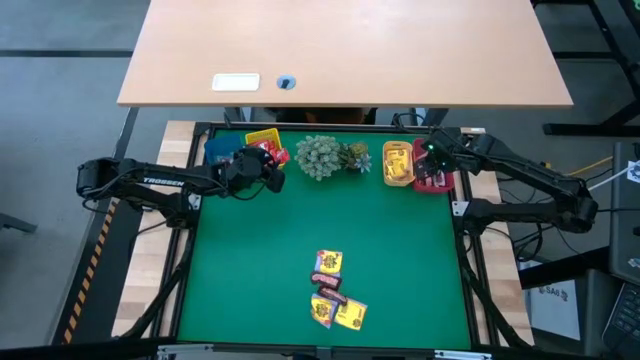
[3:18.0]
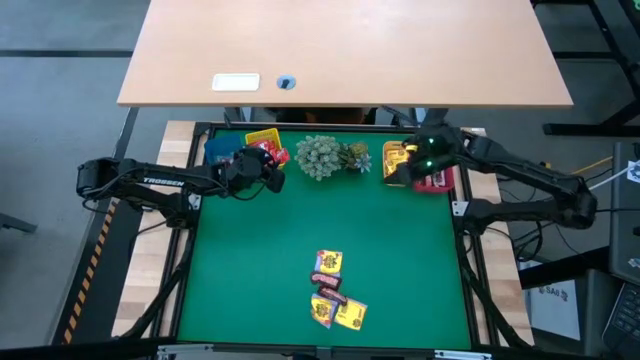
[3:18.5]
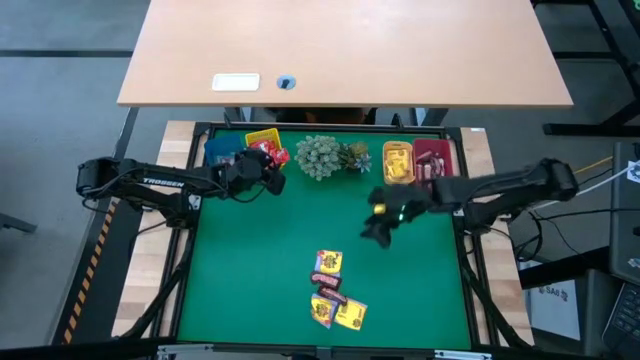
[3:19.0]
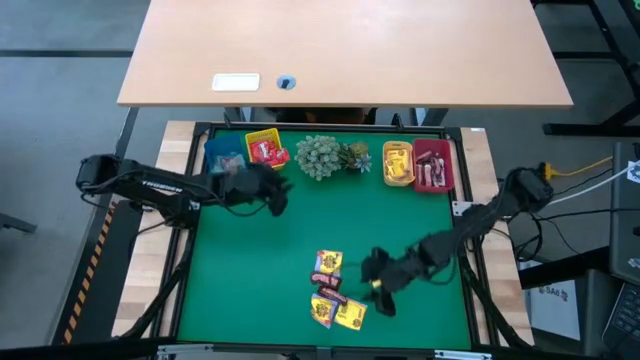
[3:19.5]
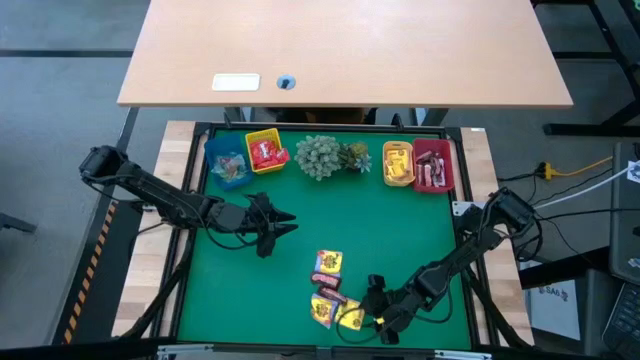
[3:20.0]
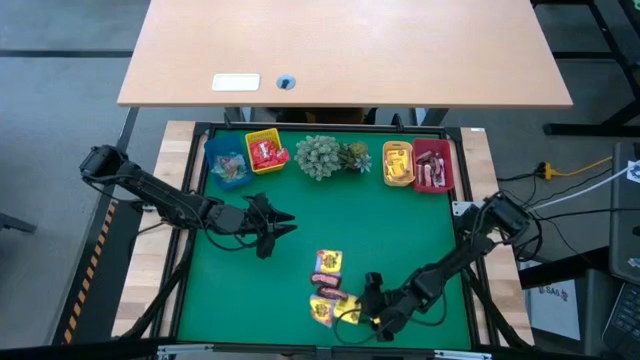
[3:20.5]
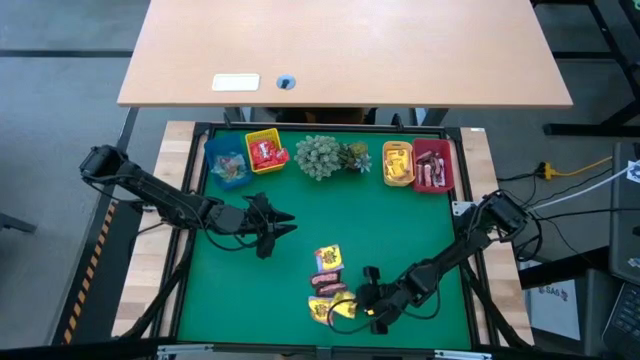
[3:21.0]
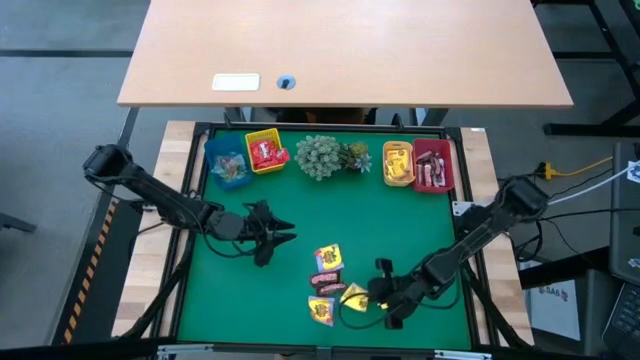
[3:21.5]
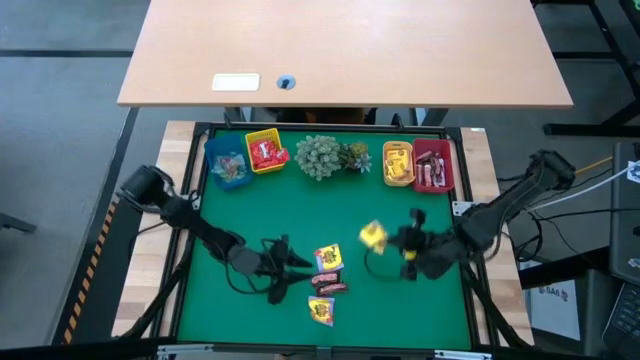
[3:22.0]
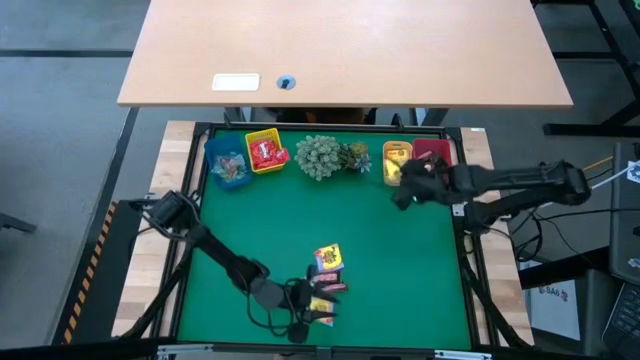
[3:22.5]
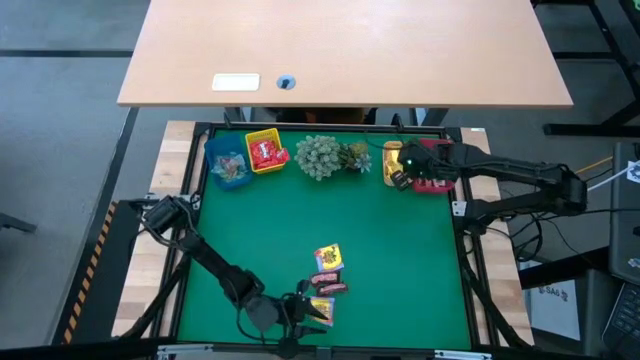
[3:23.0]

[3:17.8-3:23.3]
Task: Sort candy
Put the yellow candy into the orange bin

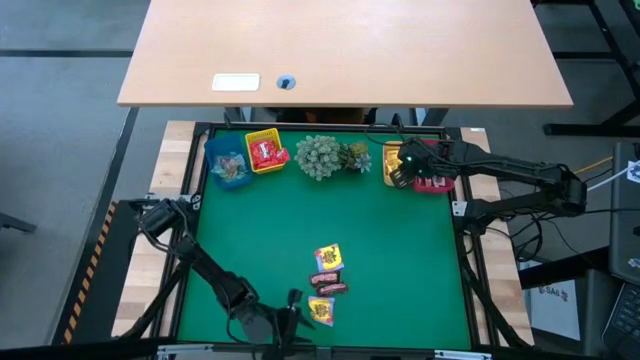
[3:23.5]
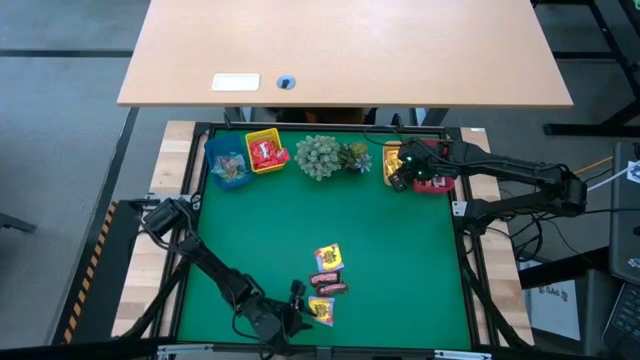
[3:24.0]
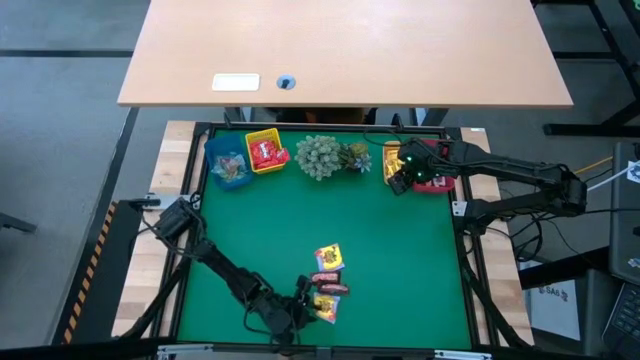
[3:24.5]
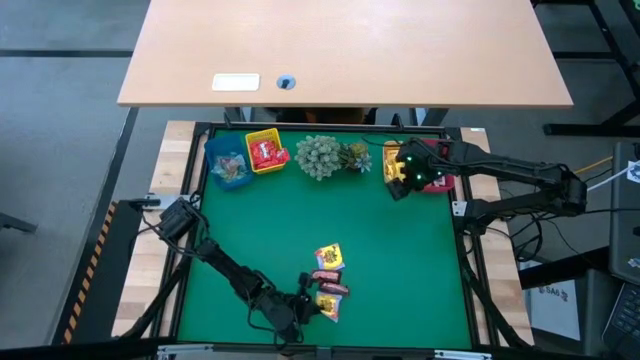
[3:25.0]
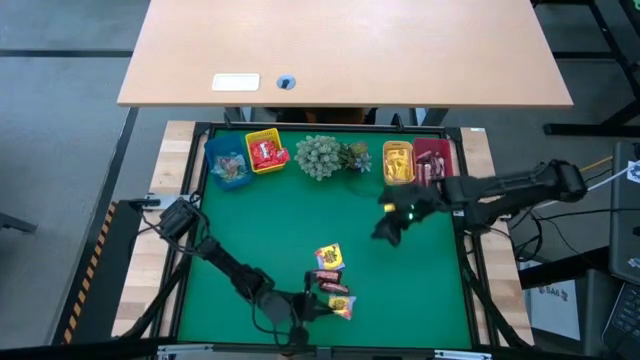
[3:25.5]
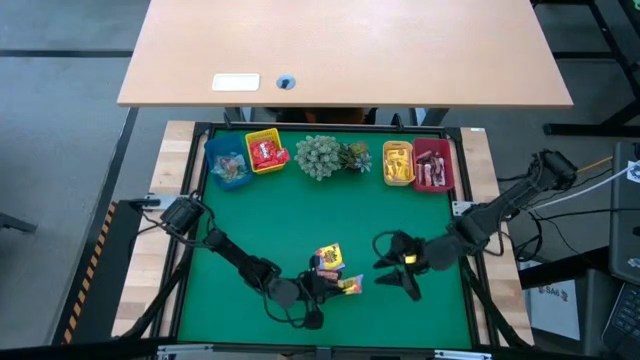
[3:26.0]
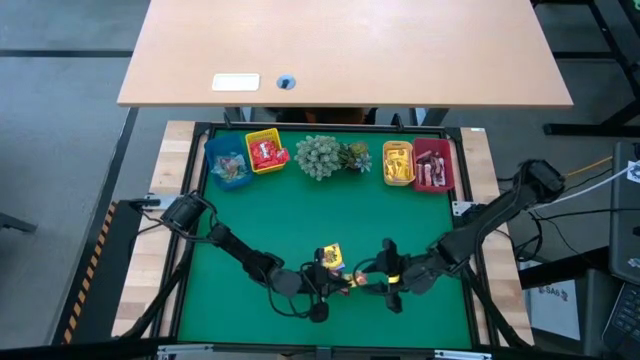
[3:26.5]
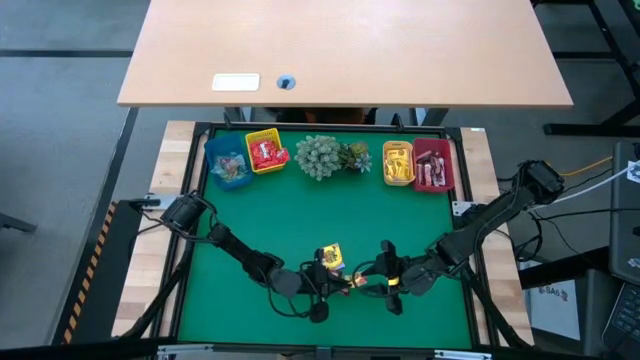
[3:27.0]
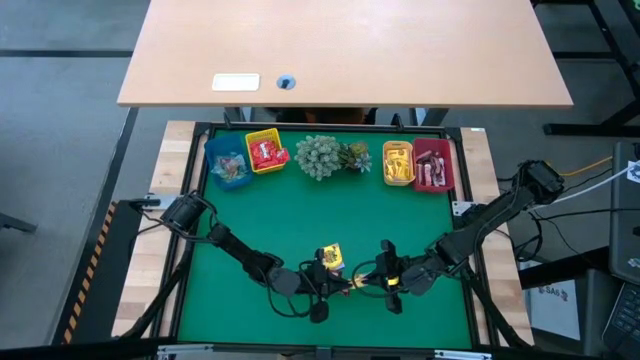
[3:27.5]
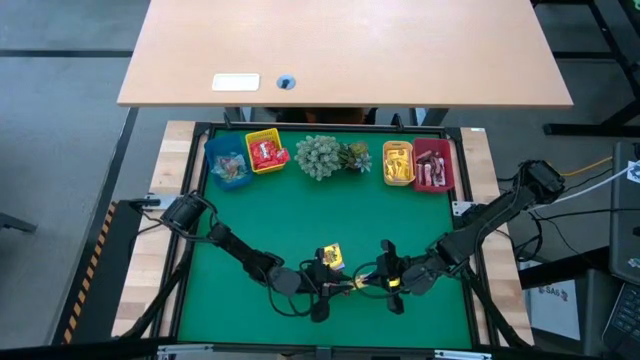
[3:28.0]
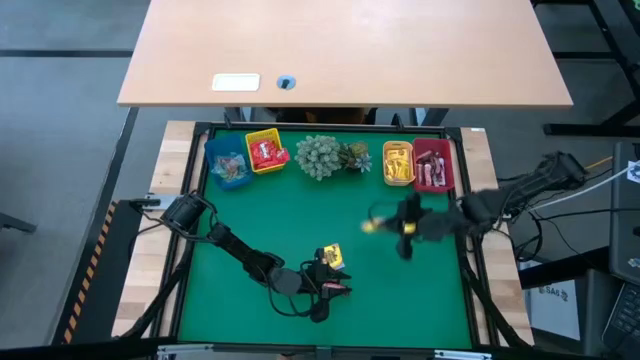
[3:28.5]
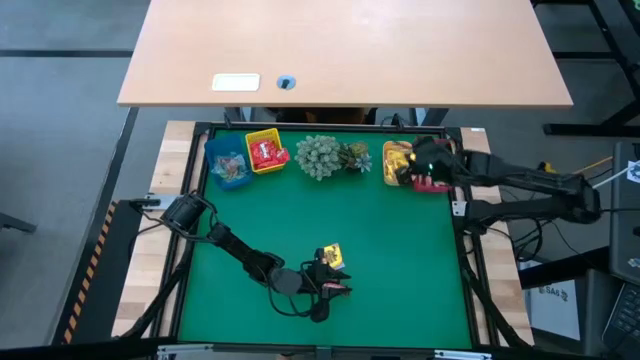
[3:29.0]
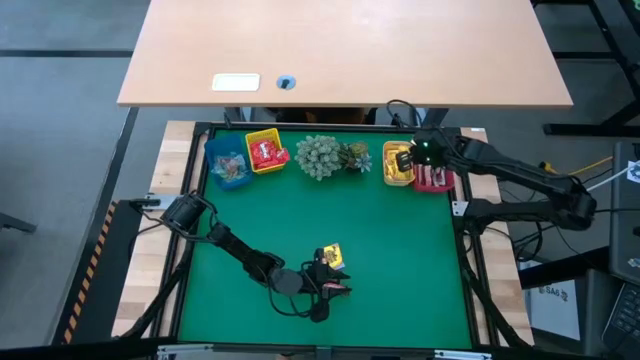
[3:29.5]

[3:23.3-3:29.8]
Put the yellow candy into the orange bin

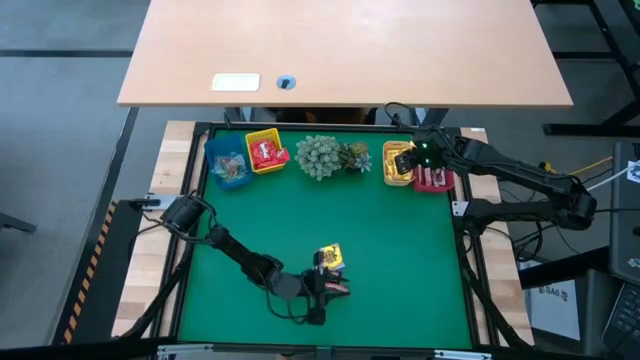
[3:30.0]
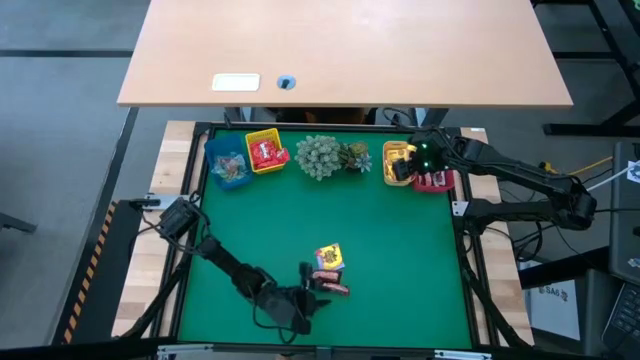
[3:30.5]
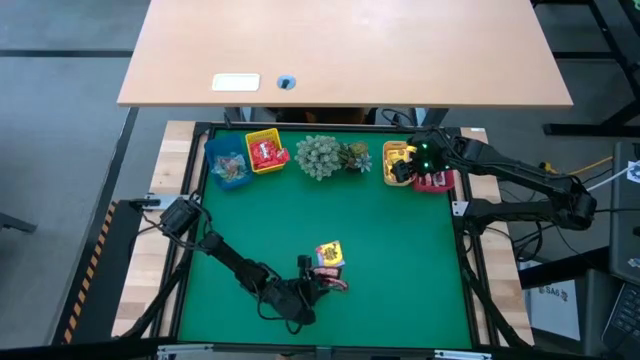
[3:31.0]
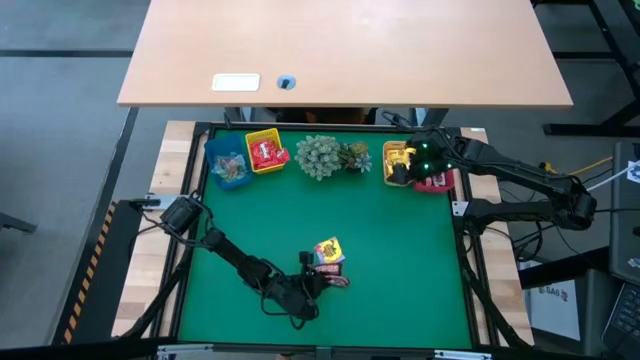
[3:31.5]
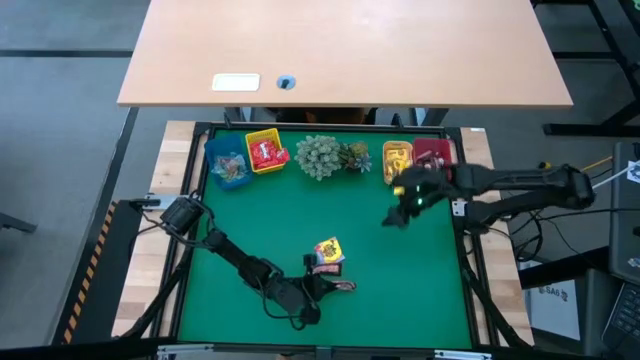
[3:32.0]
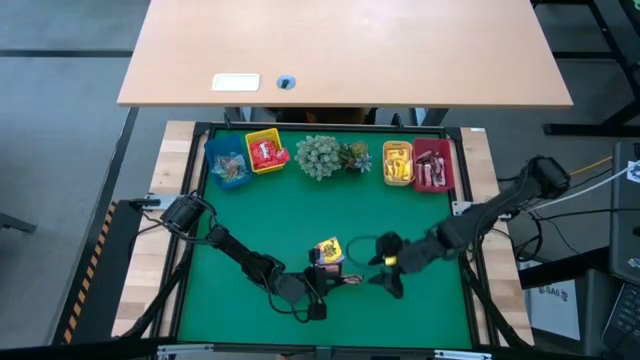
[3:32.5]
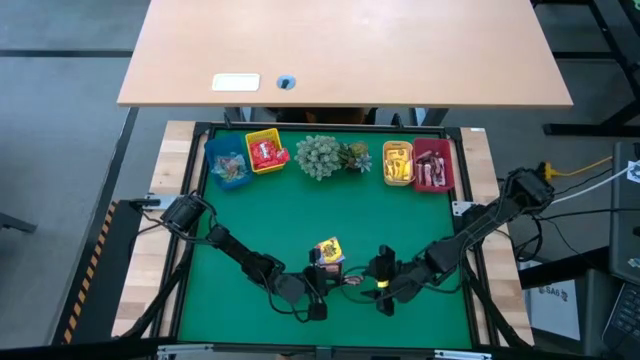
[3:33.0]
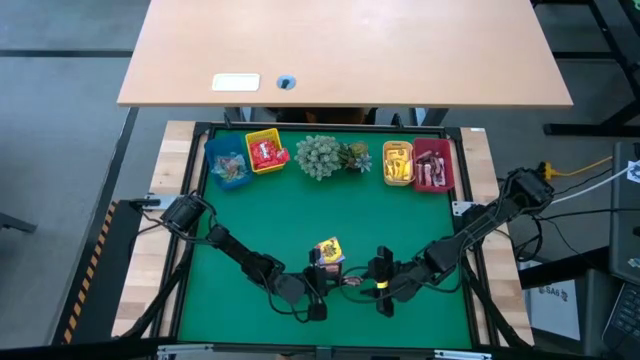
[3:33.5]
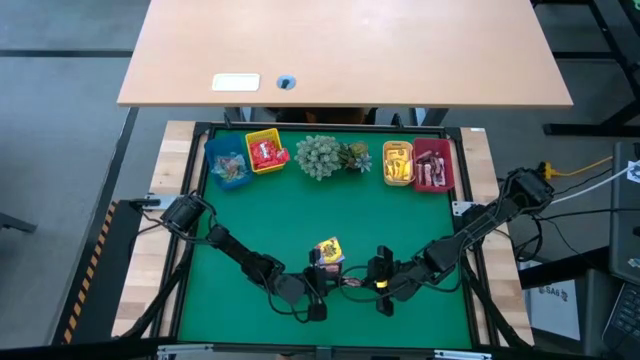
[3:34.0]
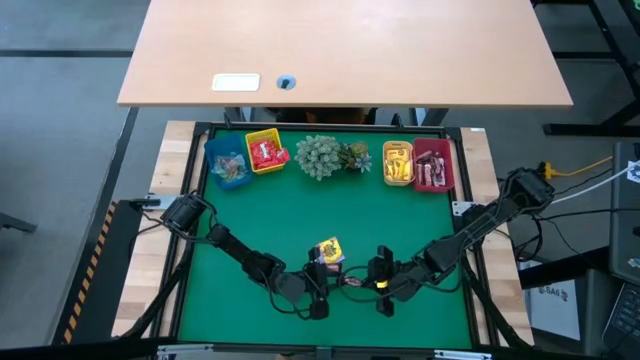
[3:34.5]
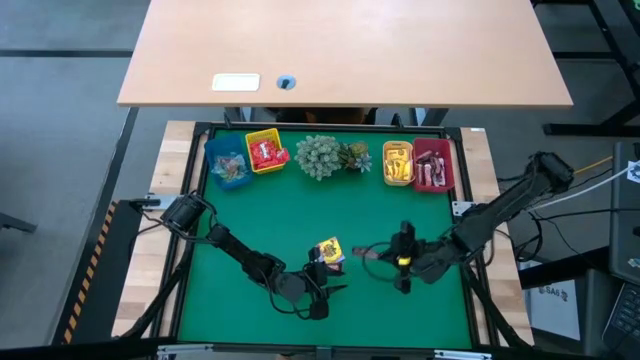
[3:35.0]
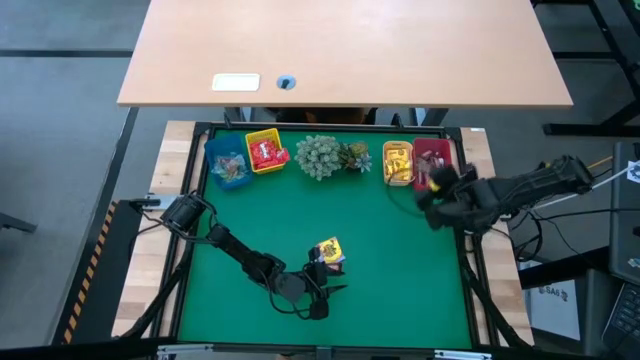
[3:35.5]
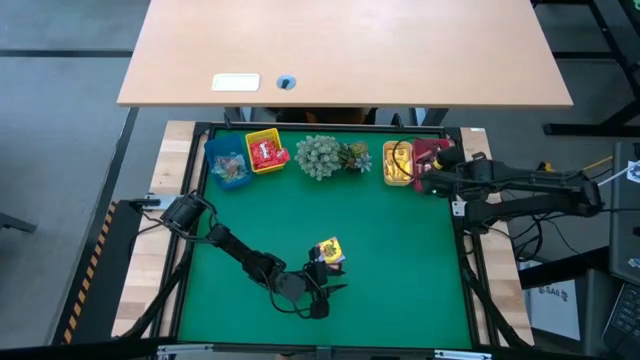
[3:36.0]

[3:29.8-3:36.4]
Put the brown chocolate into the red bin

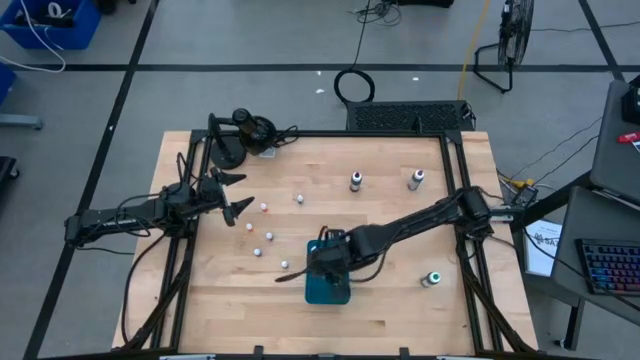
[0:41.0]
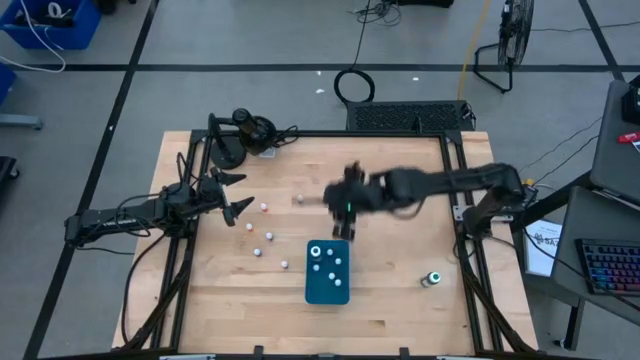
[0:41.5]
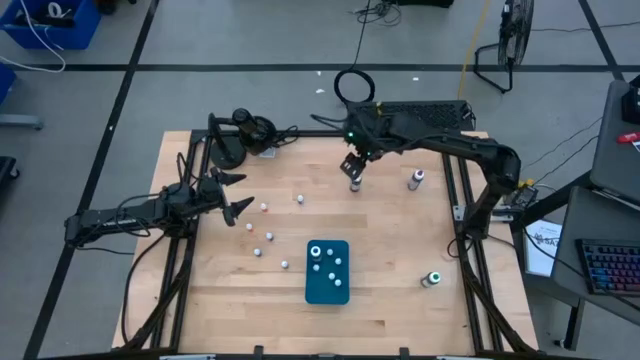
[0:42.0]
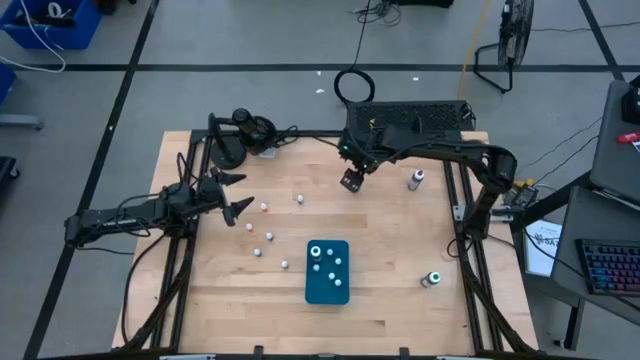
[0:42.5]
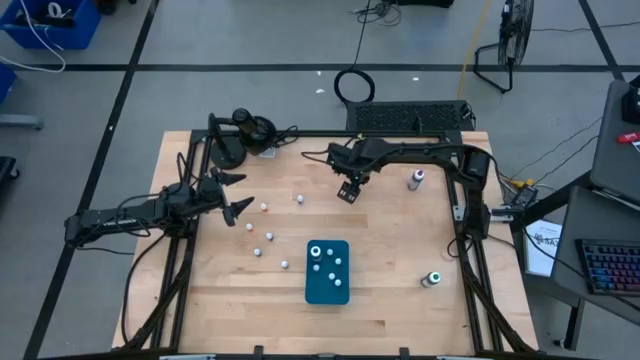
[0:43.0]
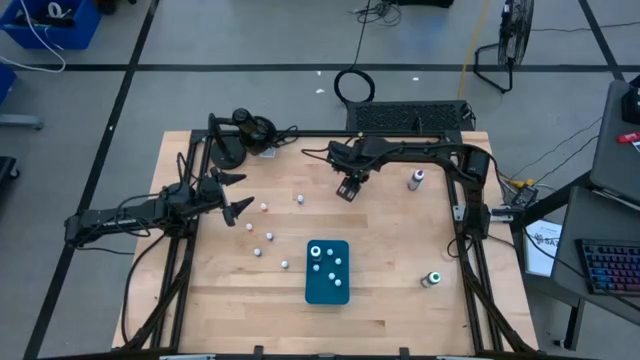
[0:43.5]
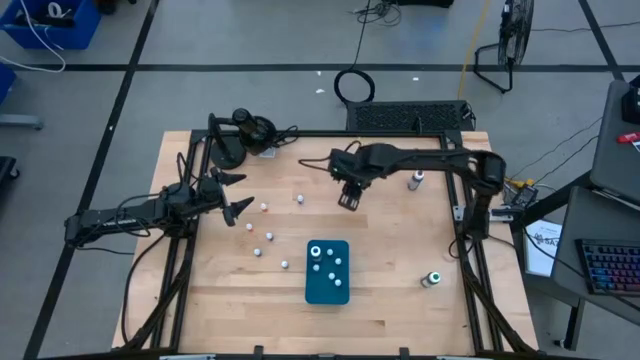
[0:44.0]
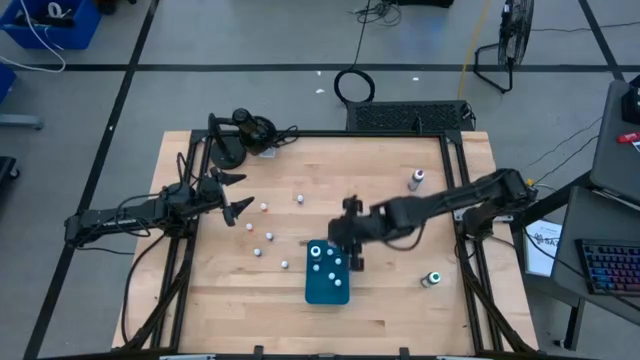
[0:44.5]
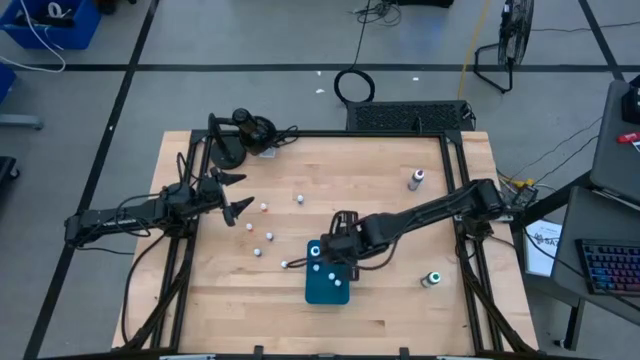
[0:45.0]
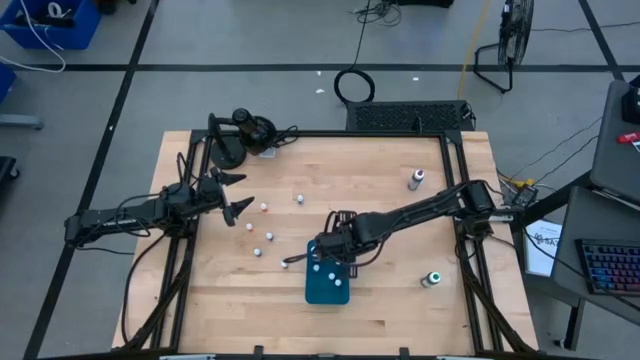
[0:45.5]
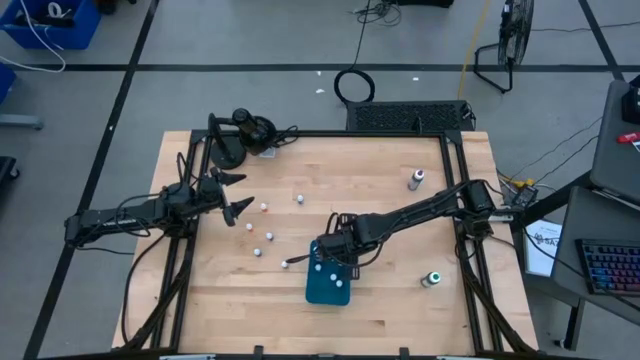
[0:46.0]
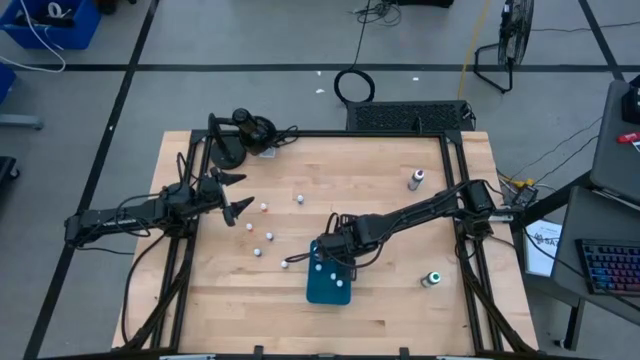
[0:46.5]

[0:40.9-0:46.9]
Task: Pick & Place food coloring
Put the black big food coloring bottle into the blue bin
